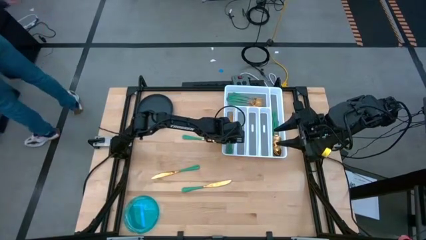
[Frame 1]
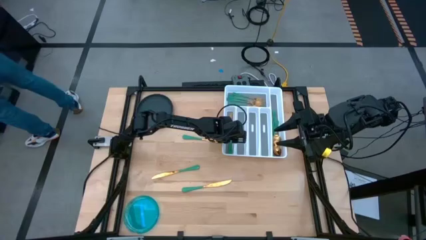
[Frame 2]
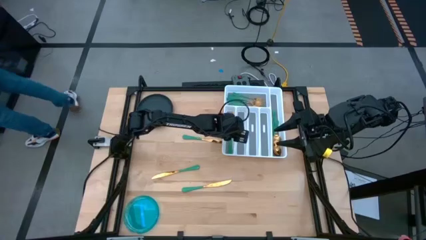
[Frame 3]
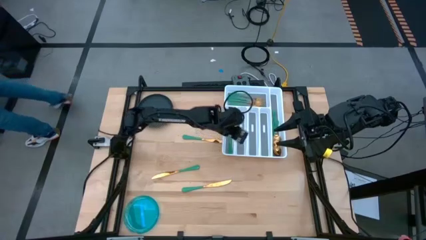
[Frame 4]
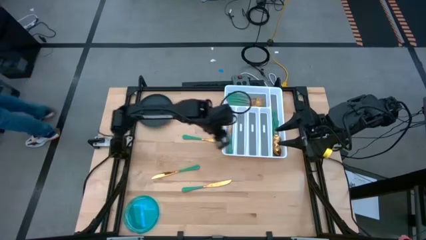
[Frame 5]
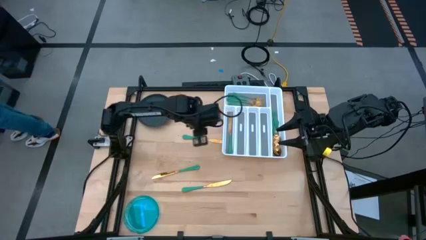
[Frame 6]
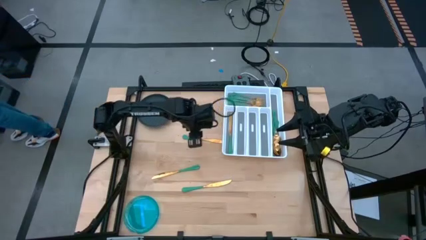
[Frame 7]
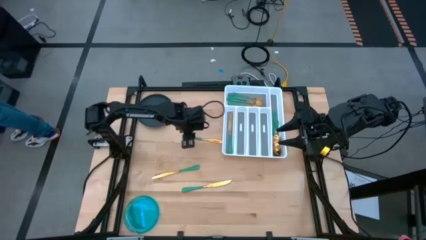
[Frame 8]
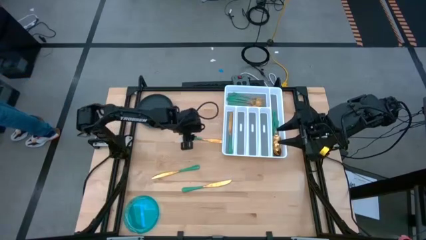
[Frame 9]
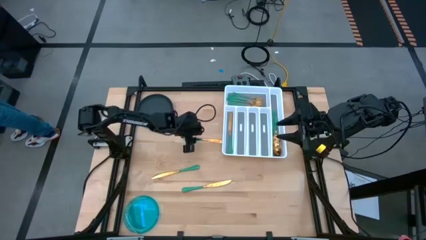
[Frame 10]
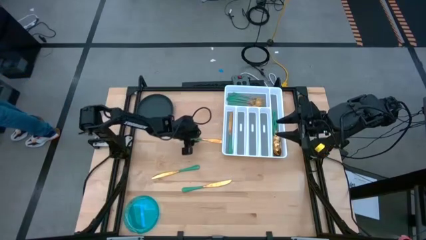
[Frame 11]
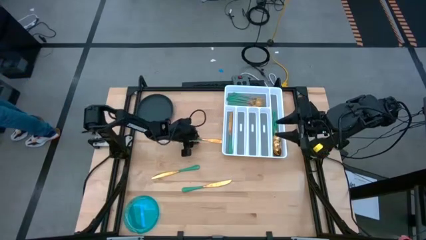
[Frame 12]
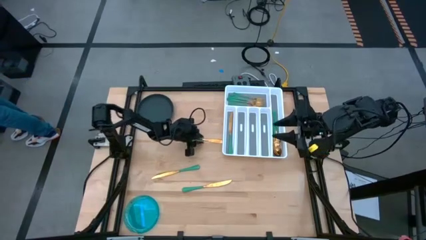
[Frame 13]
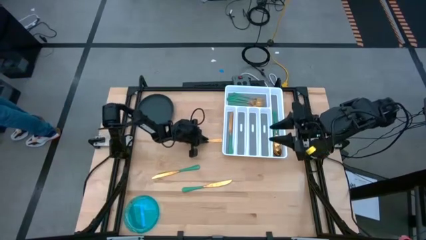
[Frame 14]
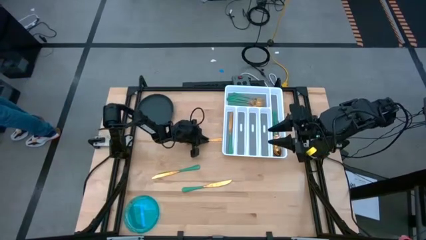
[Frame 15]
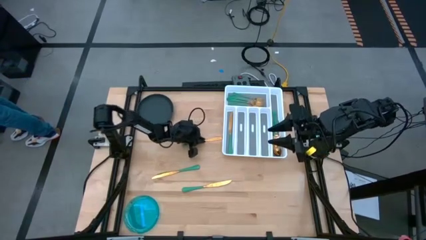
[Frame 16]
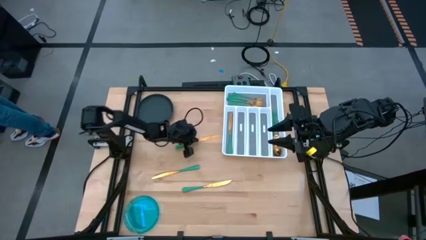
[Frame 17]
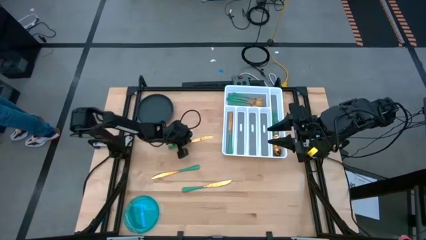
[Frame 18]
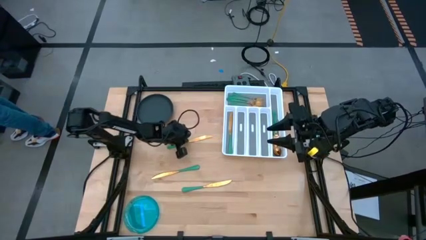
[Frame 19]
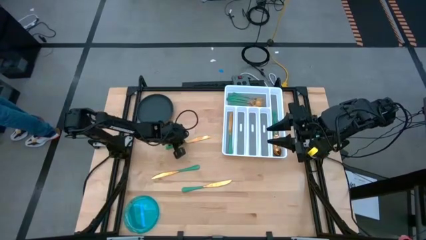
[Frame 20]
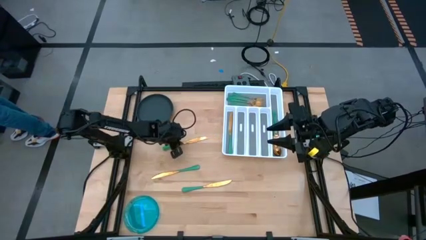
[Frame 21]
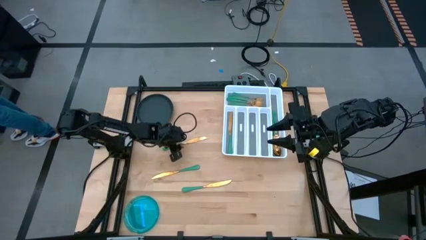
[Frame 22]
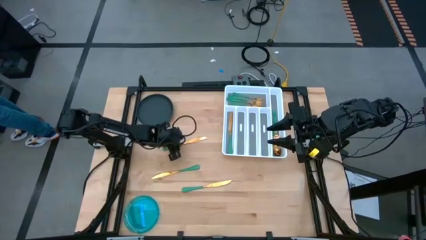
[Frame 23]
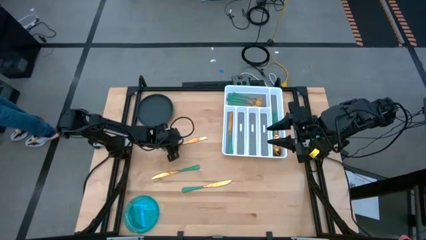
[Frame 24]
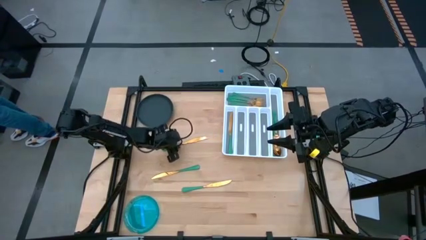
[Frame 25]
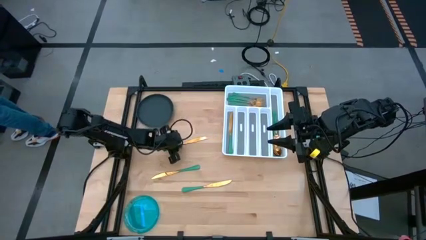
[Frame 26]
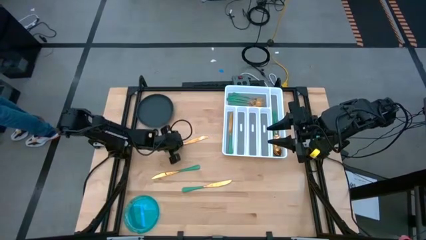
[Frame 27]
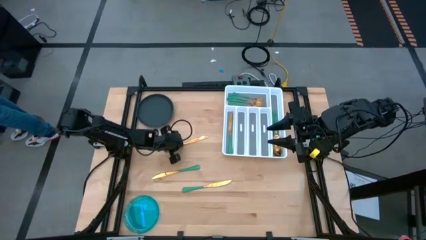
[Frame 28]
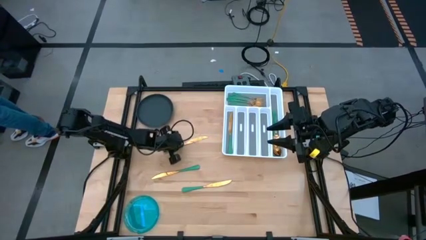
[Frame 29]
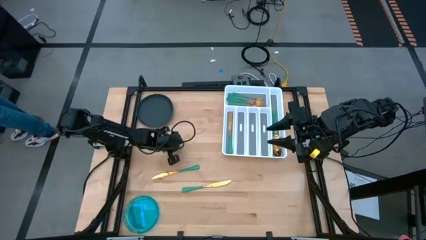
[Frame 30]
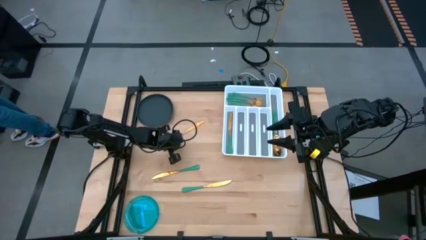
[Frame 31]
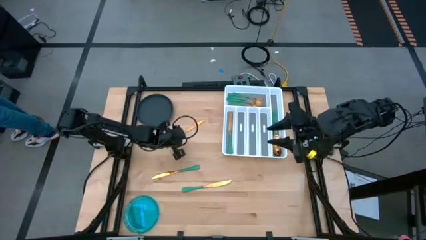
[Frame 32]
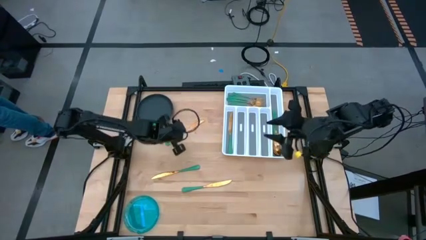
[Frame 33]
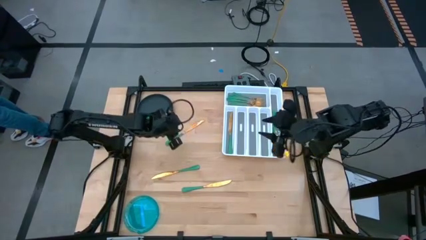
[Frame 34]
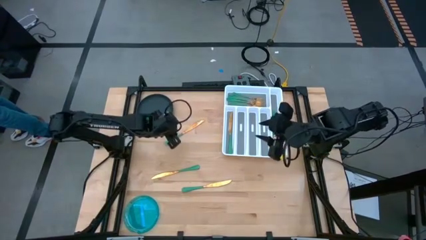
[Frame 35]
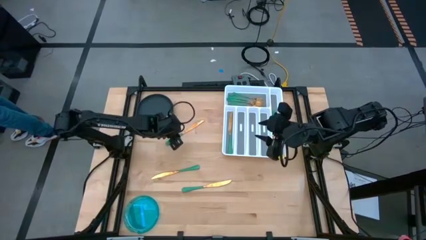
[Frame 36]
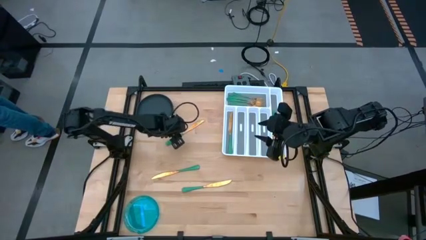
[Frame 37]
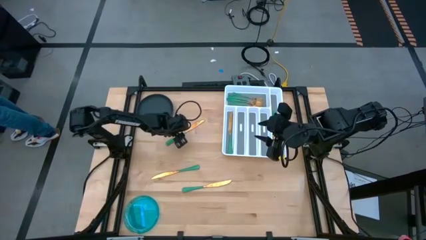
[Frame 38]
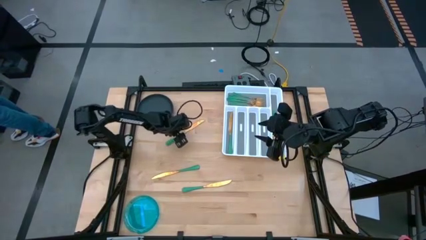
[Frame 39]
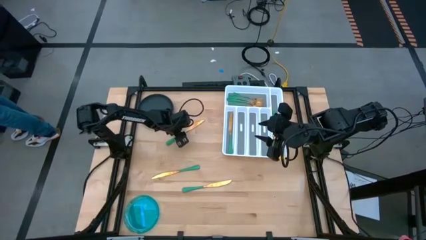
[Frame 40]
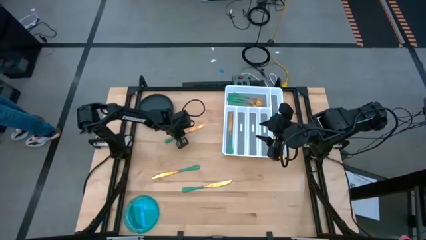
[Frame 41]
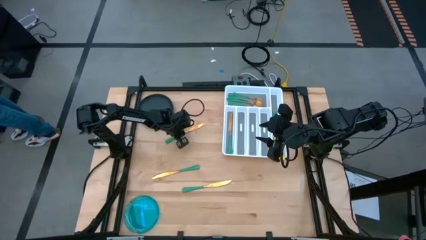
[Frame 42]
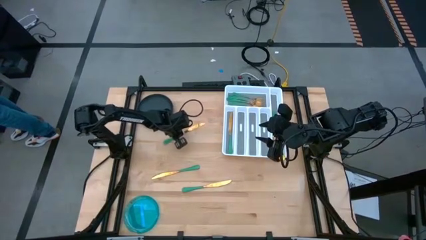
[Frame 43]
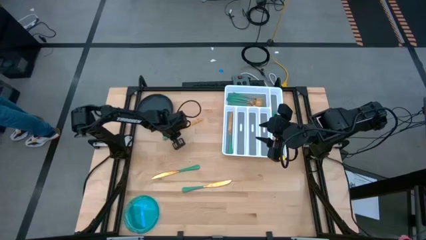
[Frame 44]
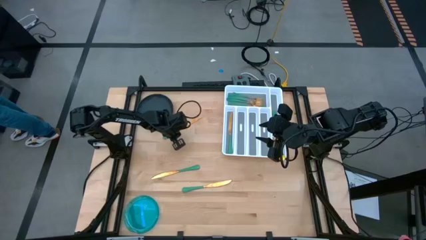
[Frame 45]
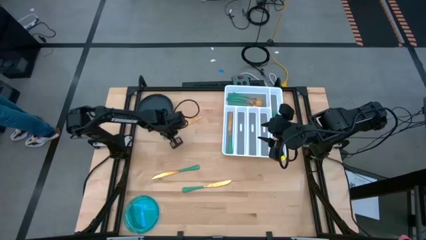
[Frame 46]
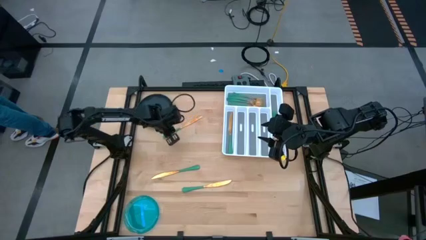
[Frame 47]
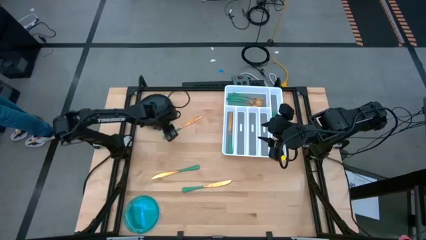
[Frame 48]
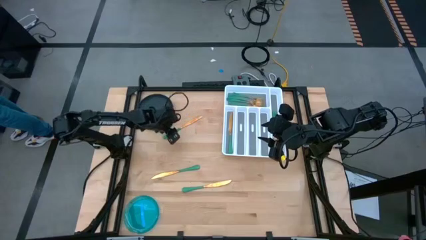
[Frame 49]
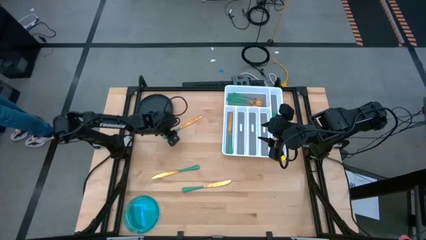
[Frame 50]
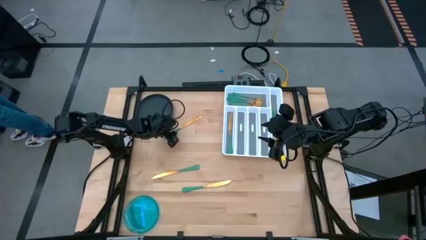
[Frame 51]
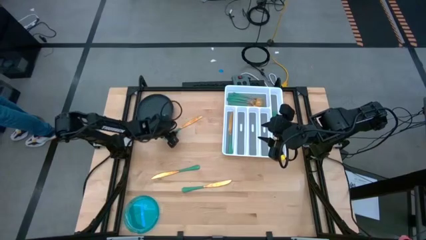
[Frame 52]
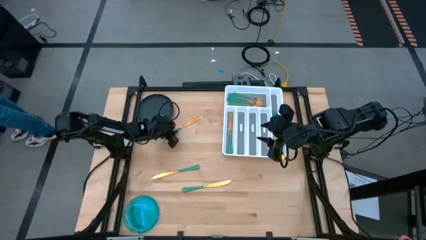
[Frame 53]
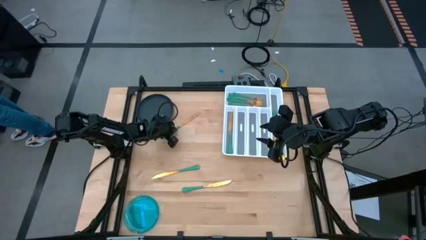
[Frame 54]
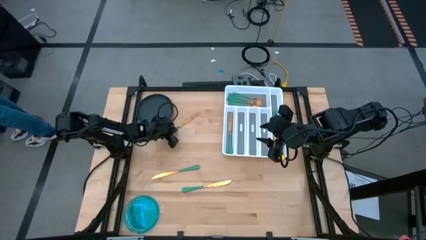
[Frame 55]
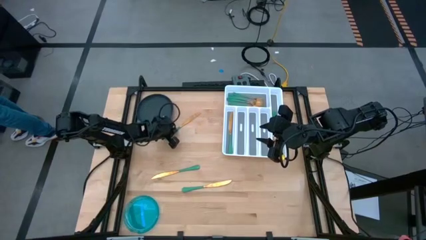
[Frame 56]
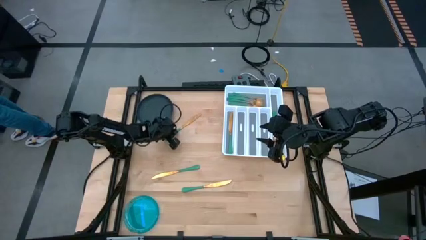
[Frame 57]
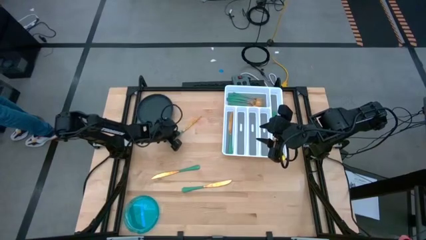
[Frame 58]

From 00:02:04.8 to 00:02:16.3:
Task: Sort silverware
Put the green knife into the silverware tray
